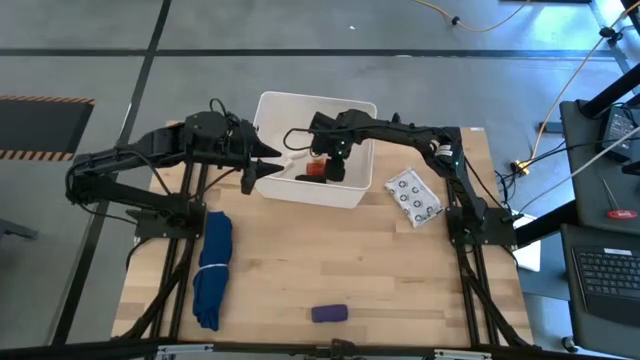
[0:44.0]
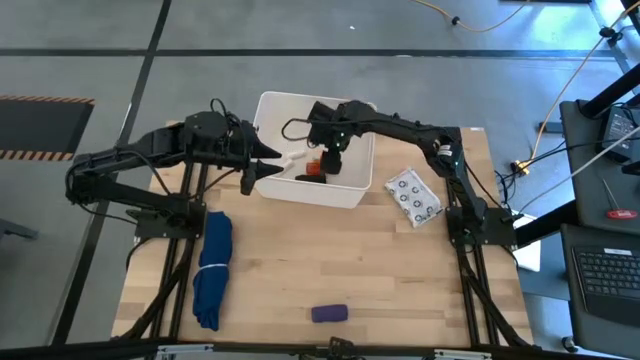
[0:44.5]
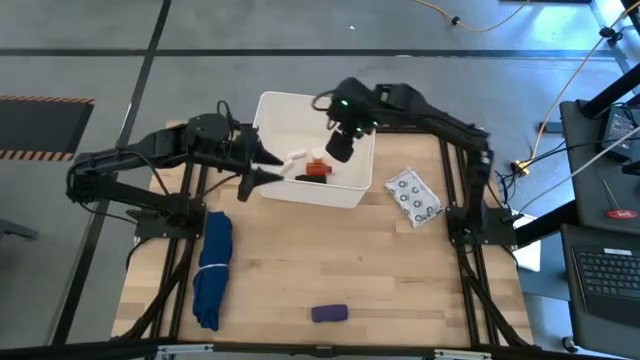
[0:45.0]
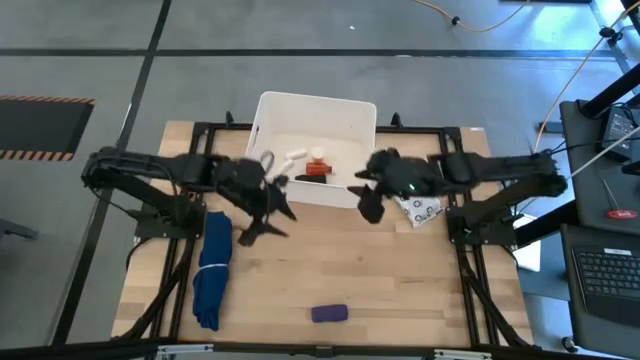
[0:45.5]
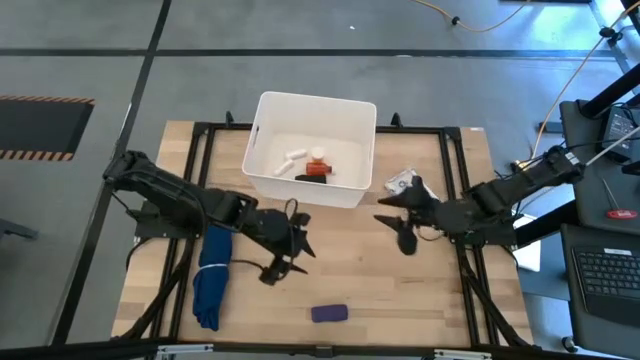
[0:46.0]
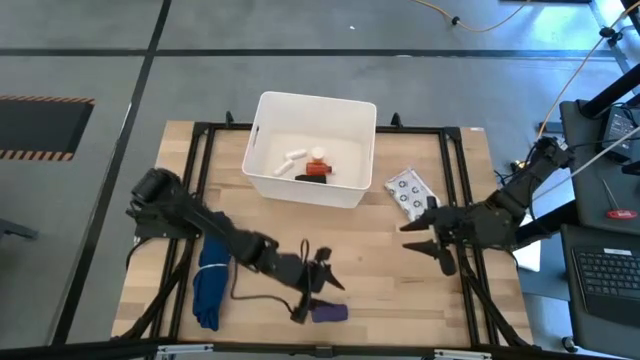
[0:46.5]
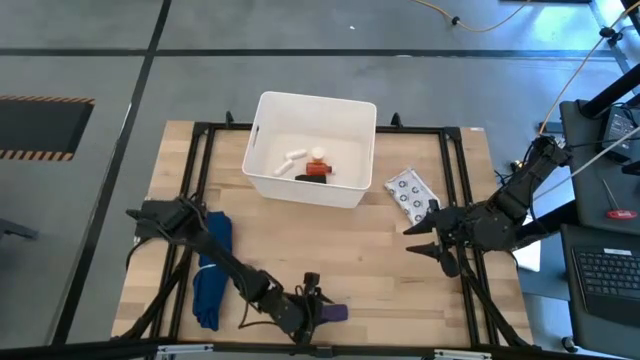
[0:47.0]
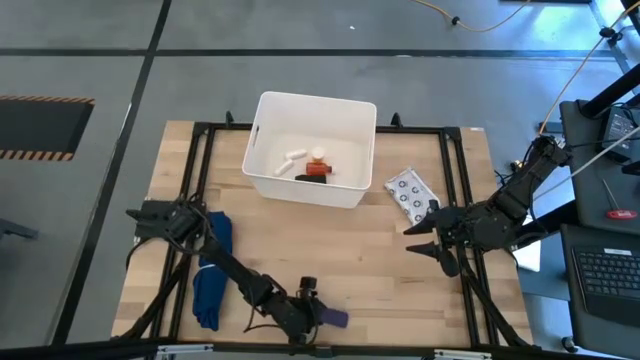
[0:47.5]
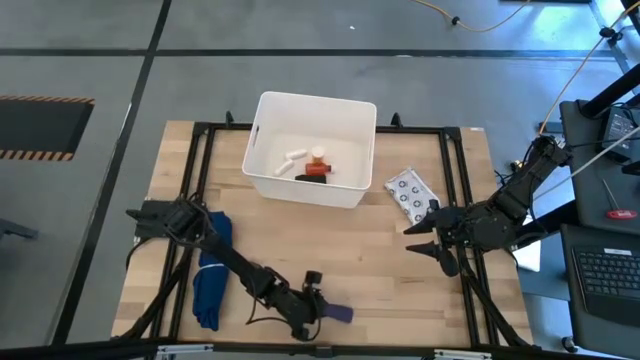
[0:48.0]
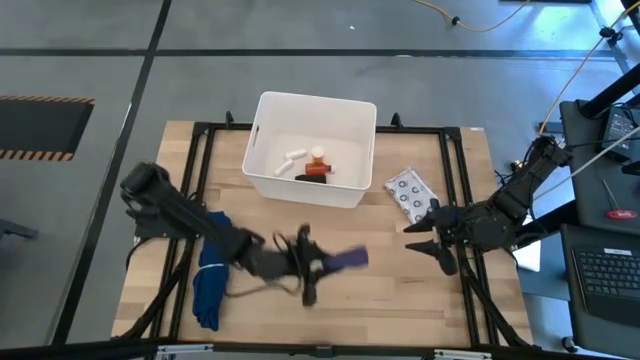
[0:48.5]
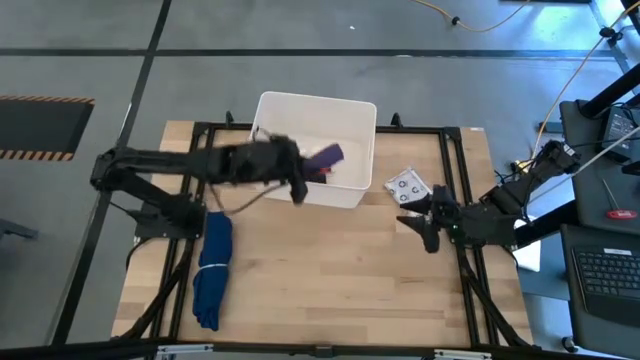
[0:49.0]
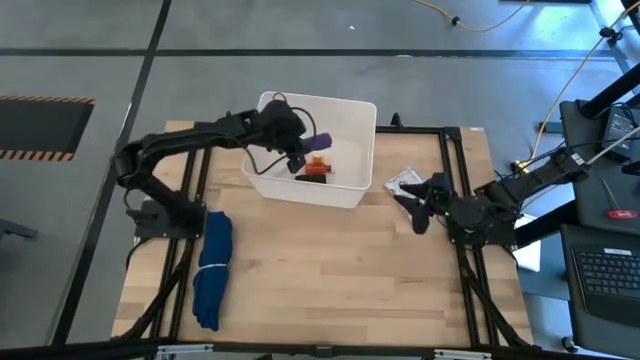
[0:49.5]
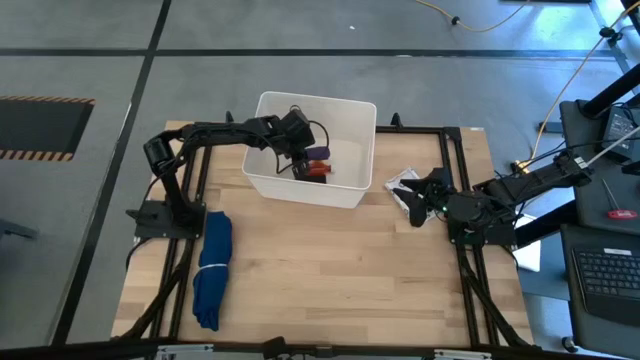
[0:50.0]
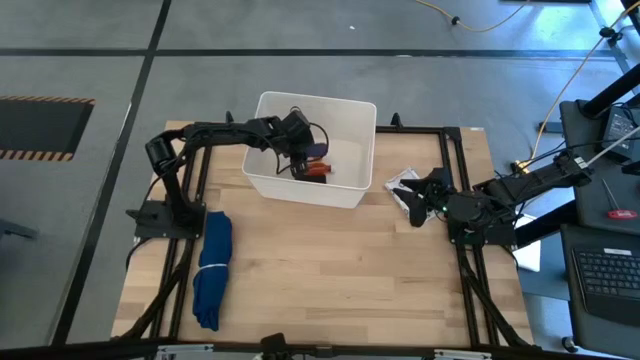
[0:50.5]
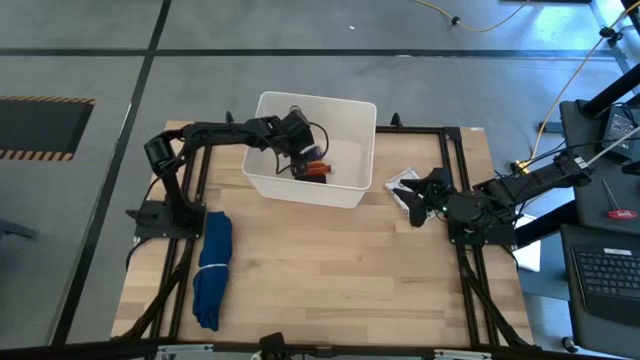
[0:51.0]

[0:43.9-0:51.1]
Task: Pick & place medical supplies in basket/bin
Put the purple bandage into the white bin

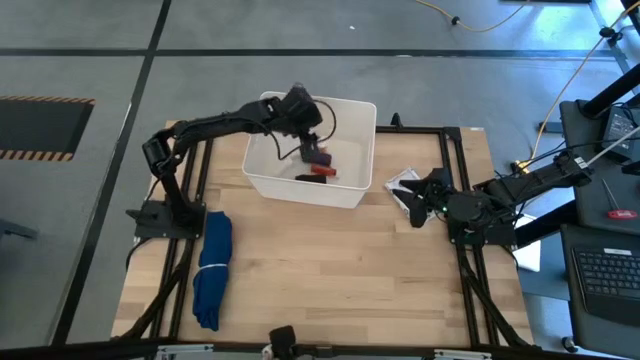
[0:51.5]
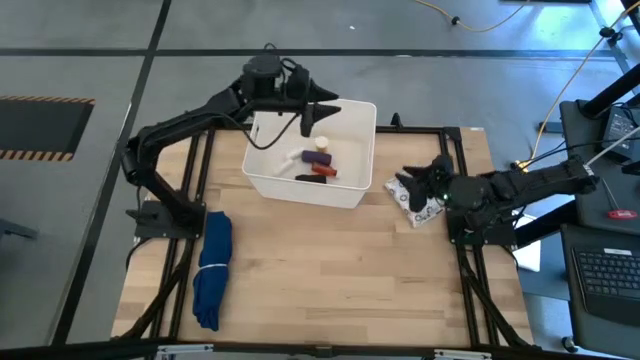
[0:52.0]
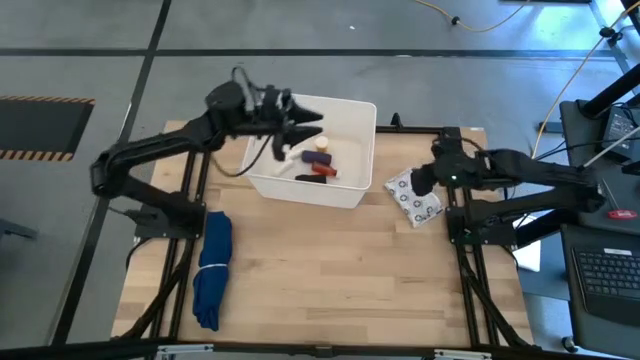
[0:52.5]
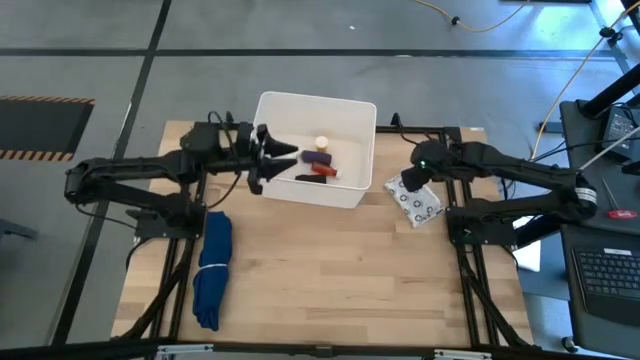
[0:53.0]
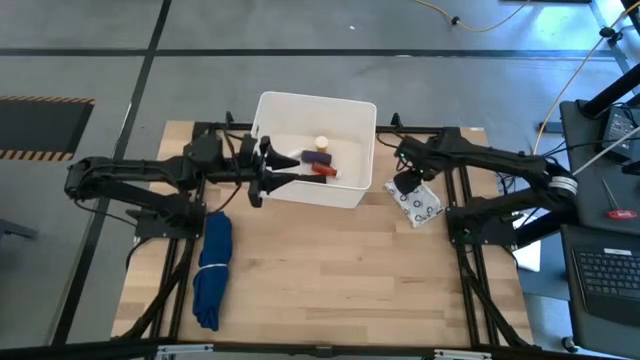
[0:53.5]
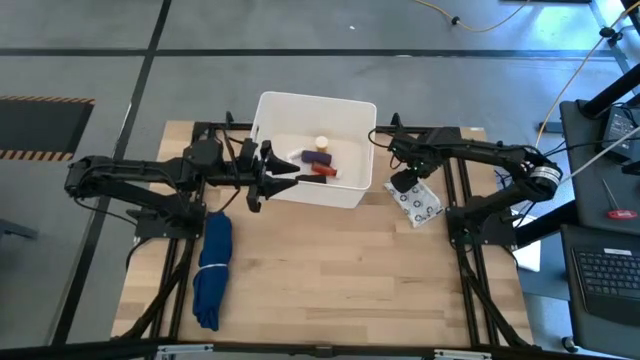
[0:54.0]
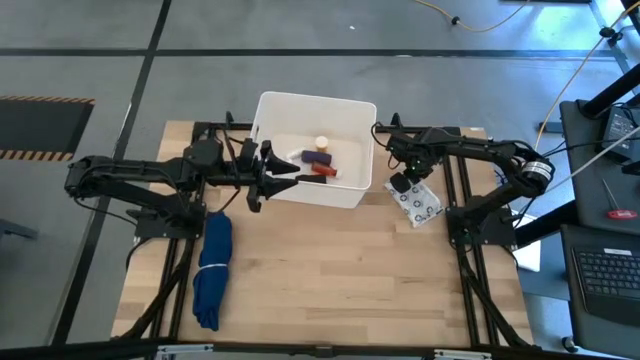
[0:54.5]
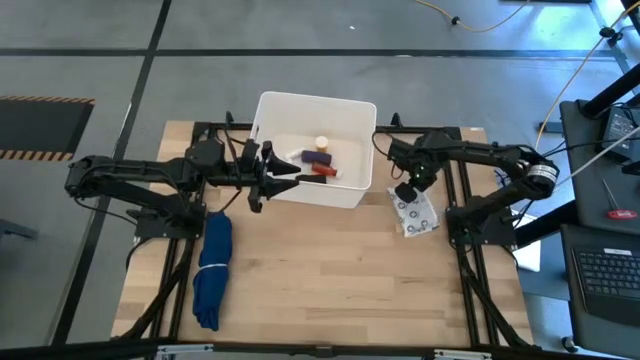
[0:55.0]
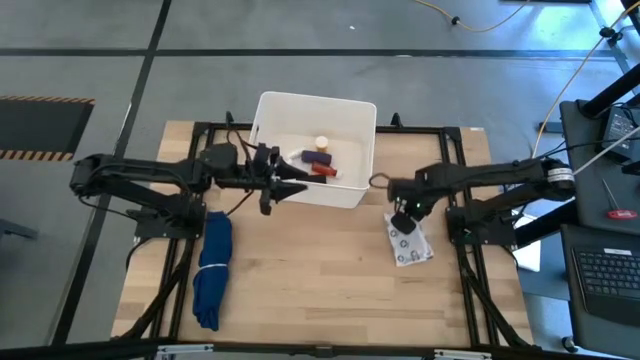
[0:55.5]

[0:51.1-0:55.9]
Put the white mailer bag into the white bin

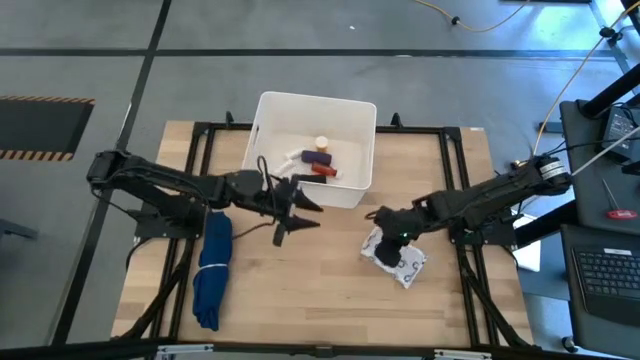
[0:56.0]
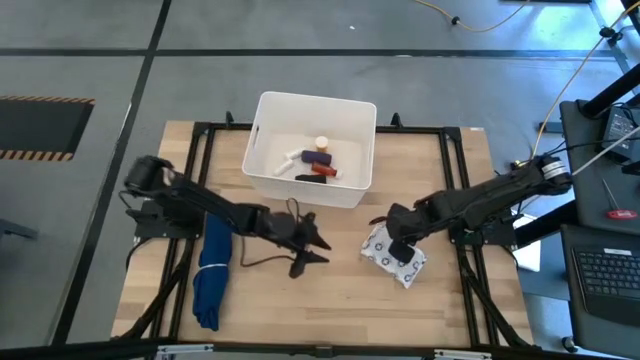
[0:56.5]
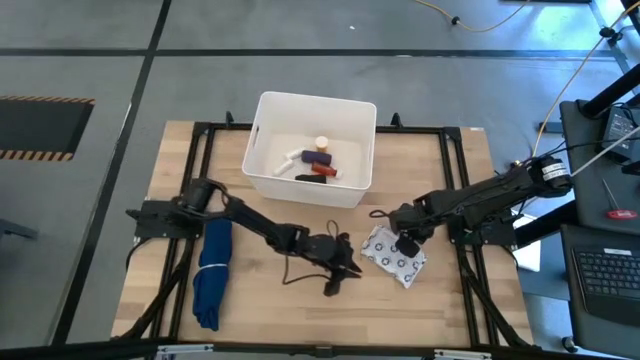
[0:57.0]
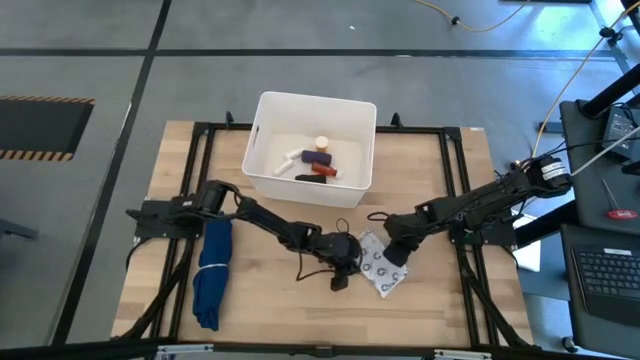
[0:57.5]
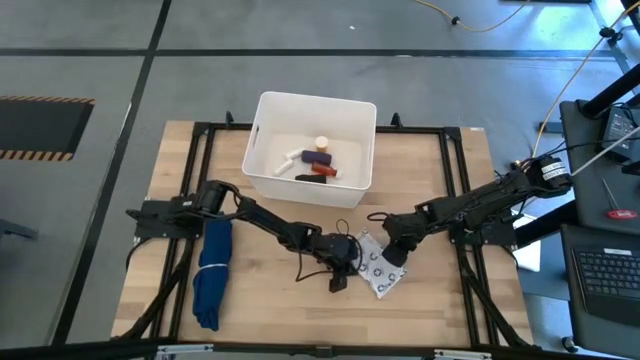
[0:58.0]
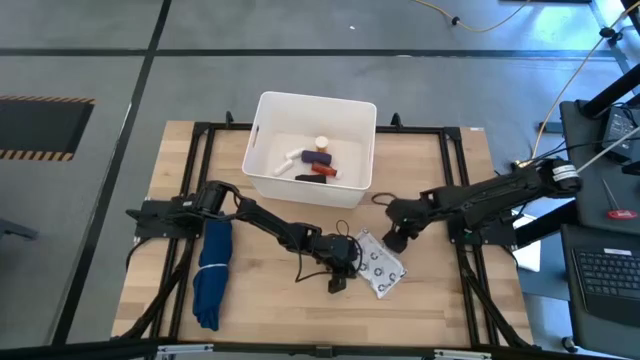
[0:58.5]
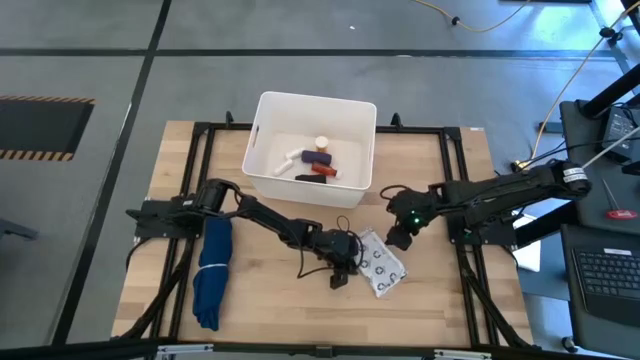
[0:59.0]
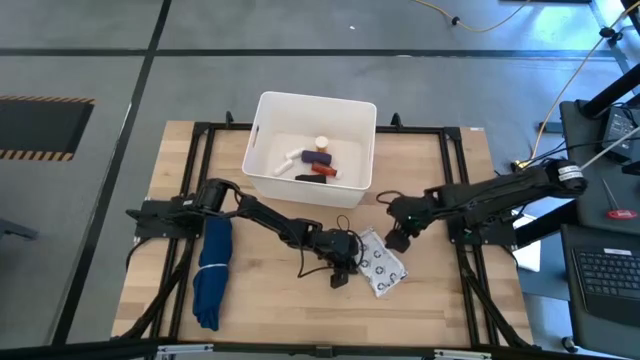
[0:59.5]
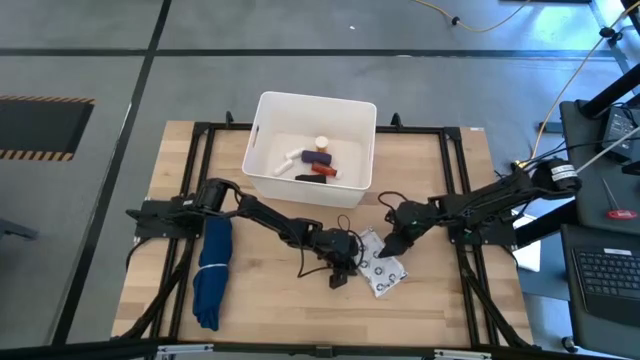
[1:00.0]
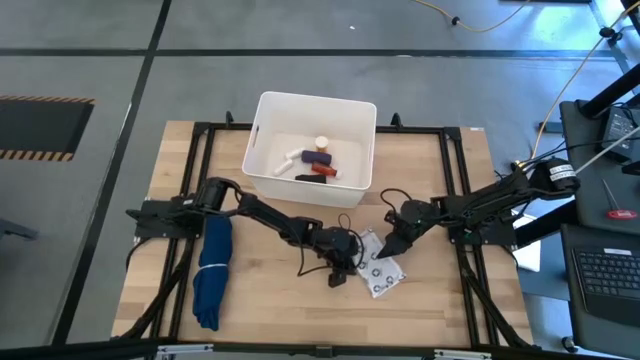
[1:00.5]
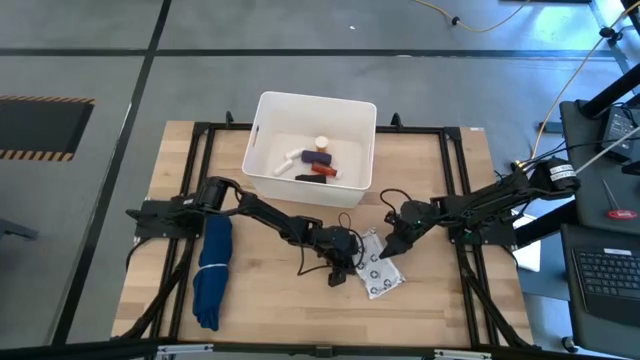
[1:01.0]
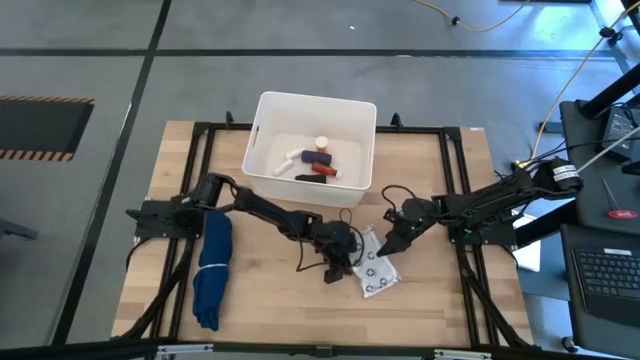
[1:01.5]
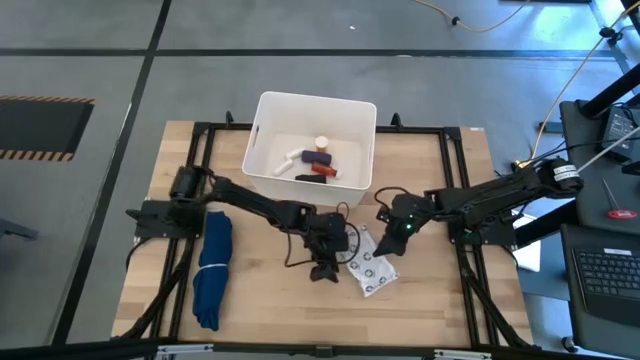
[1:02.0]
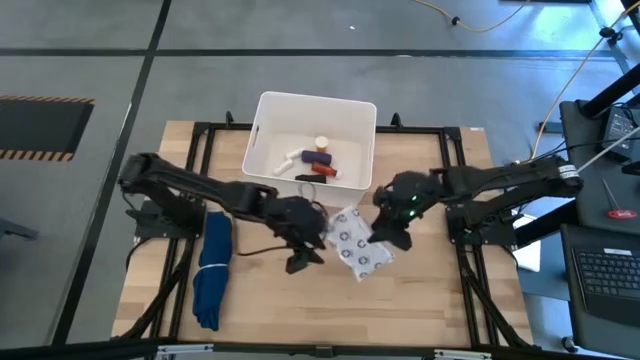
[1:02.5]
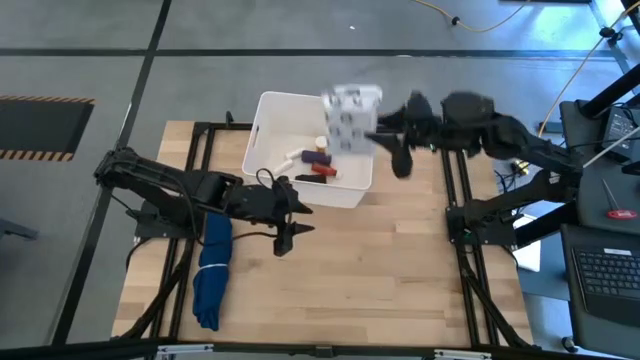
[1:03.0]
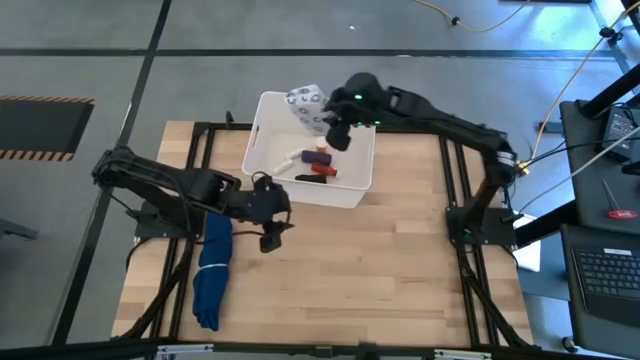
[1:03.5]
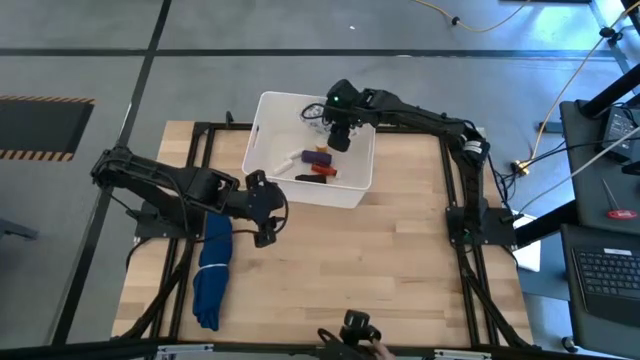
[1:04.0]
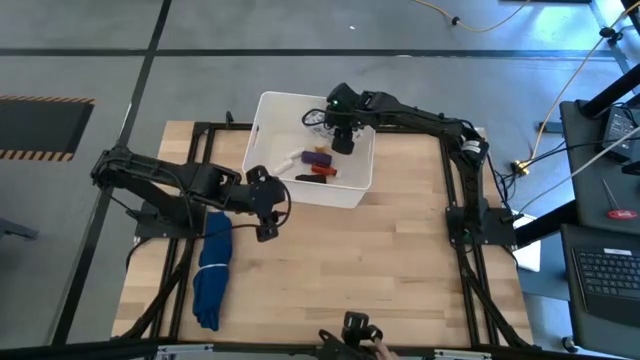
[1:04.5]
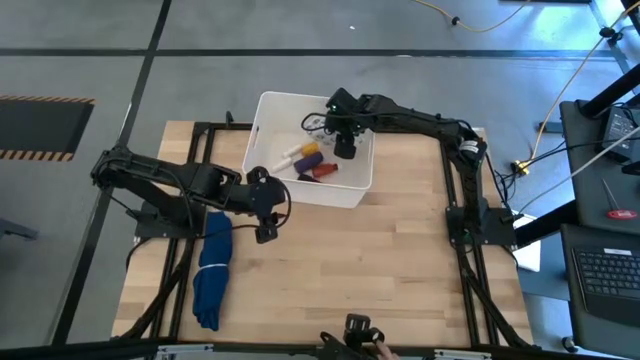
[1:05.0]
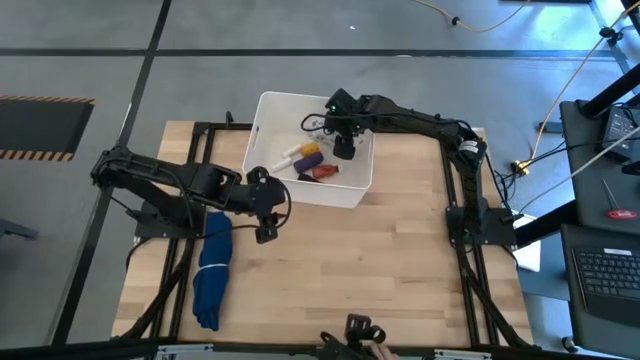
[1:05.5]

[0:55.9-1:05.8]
Put the white mailer bag into the white bin
